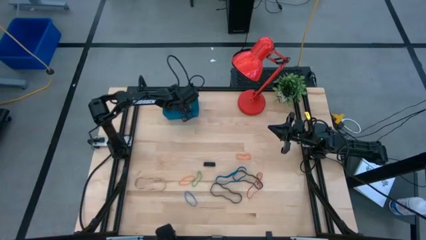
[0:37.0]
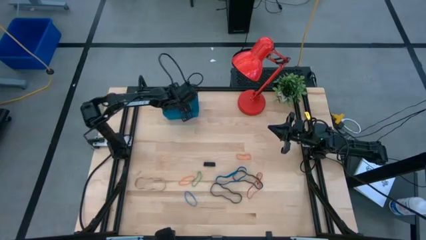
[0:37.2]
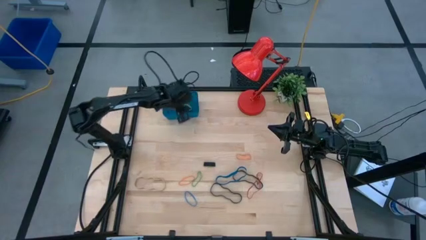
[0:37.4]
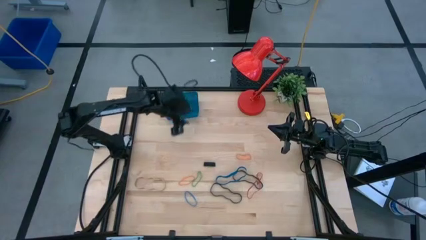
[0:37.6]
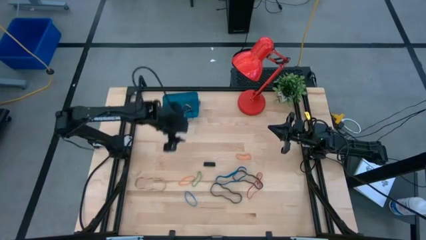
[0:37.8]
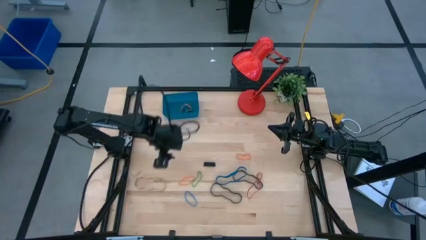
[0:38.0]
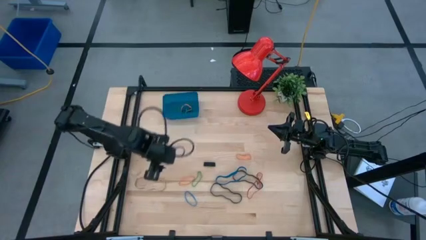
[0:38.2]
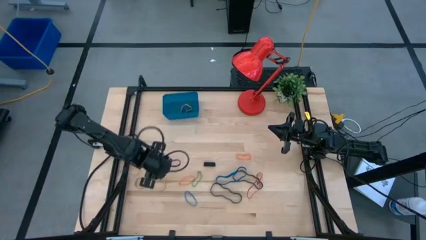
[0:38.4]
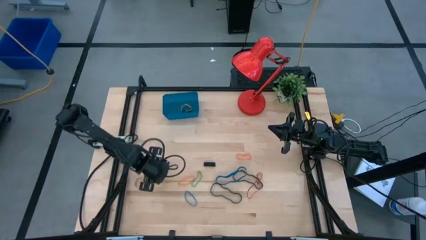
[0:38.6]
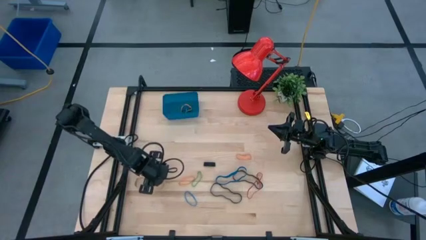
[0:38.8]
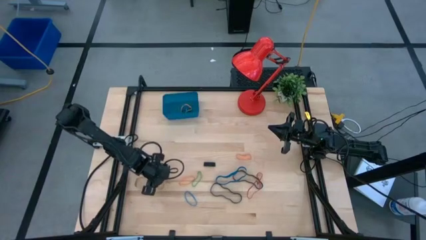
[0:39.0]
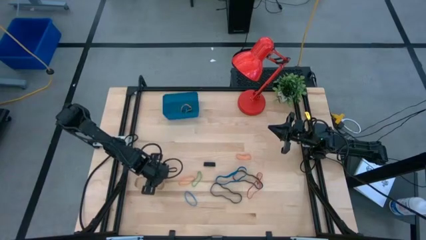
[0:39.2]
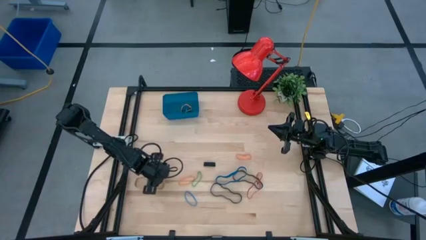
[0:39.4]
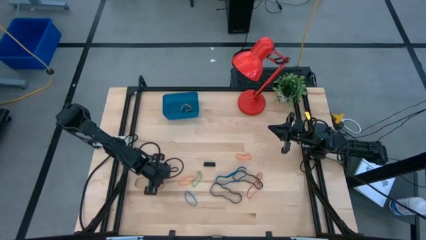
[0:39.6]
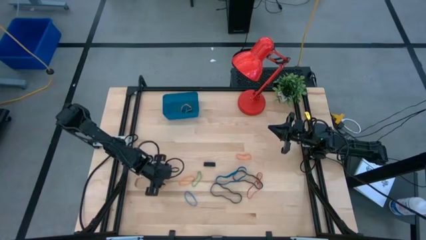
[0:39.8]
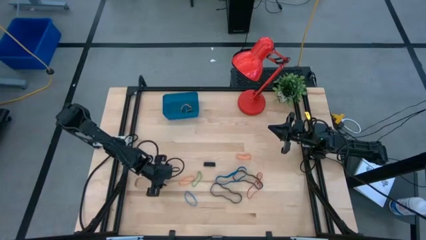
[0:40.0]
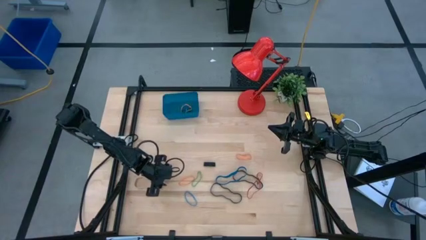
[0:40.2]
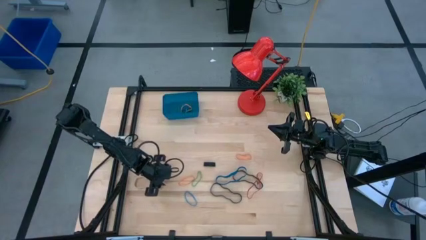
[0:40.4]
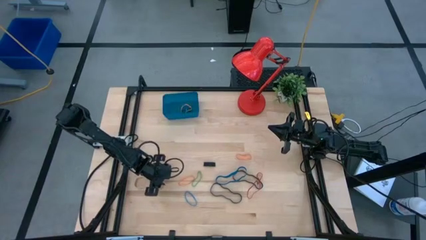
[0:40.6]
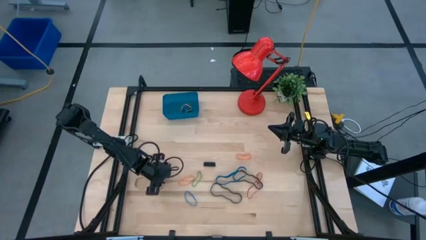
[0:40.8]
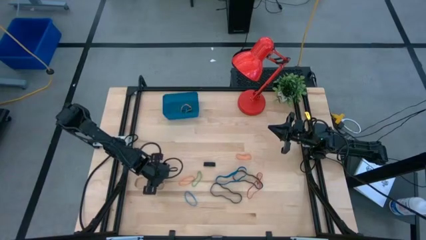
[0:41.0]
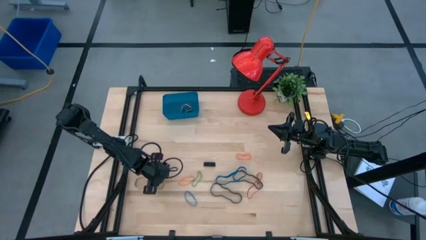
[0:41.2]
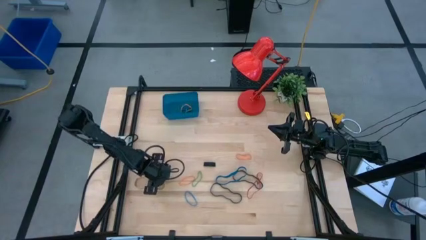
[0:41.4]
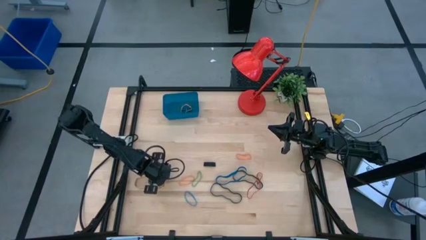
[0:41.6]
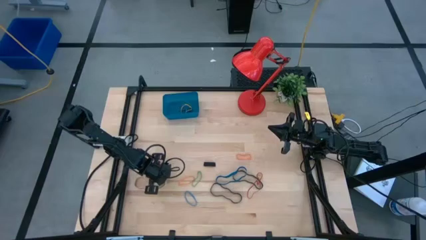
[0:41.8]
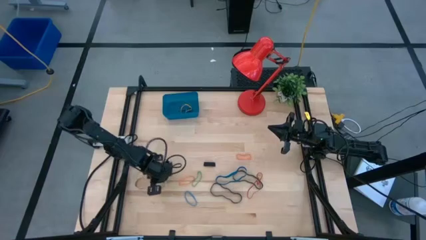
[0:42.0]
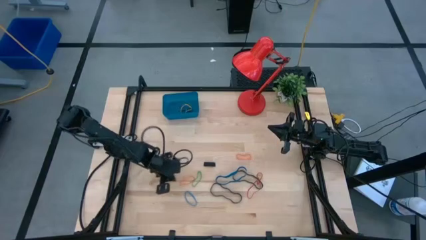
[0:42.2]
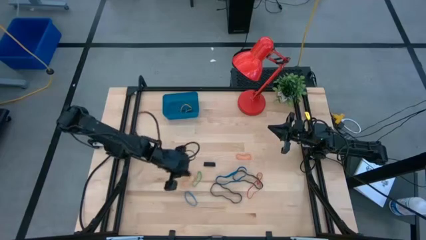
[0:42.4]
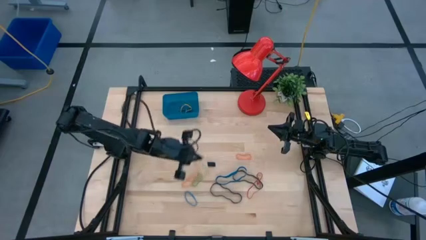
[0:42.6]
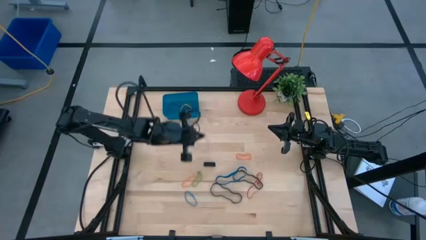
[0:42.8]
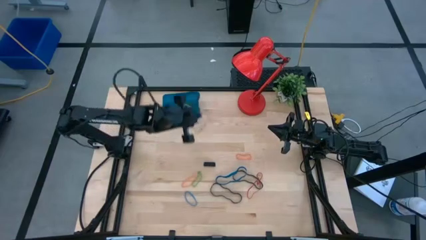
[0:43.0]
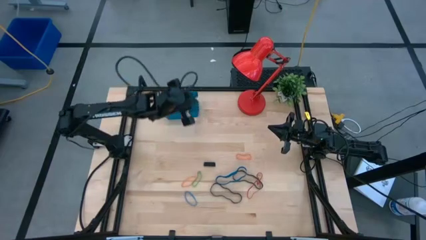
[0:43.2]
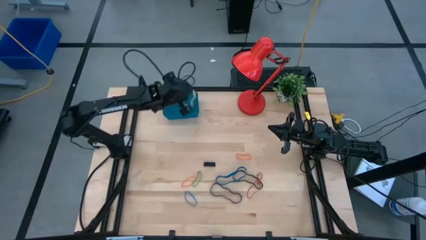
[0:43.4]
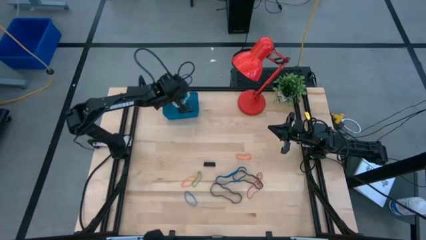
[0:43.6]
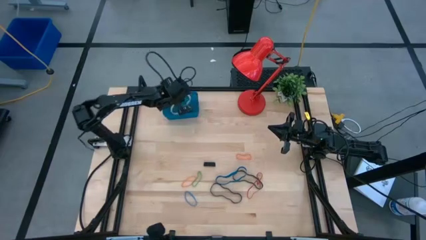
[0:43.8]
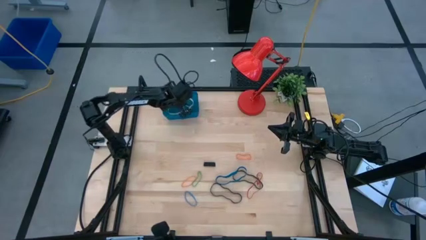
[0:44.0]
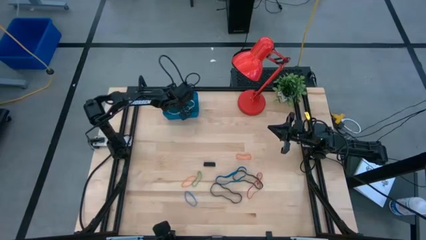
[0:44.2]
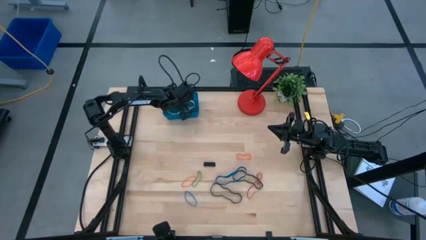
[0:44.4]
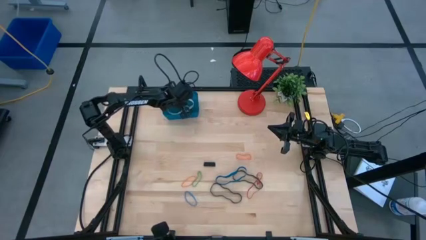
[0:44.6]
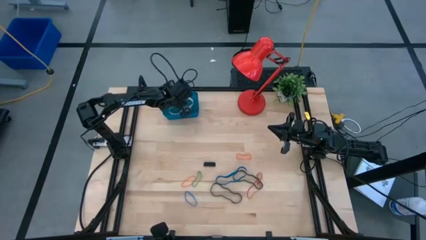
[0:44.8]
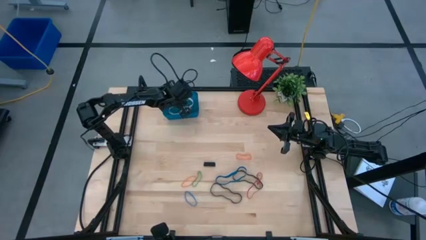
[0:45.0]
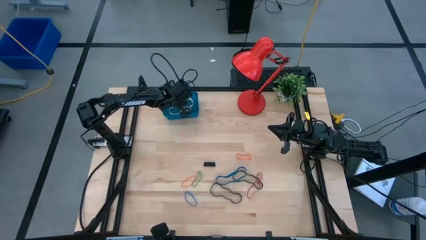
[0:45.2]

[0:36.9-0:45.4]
Task: Pick and place rubber bands into bin
Put the brown rubber band into the blue container

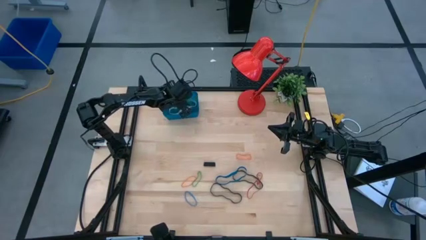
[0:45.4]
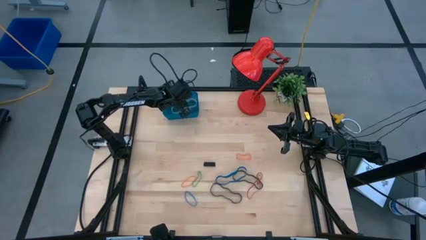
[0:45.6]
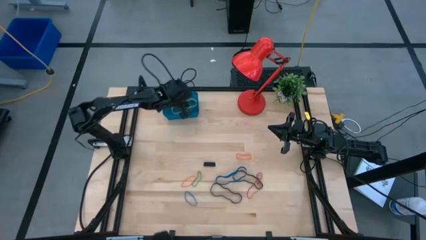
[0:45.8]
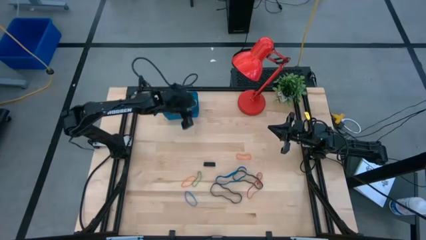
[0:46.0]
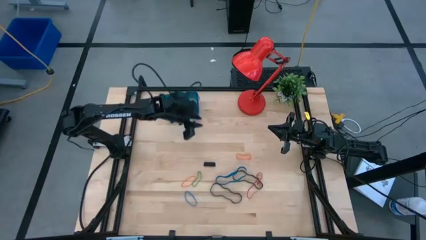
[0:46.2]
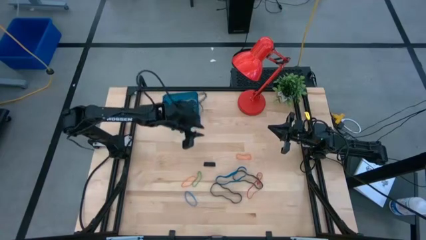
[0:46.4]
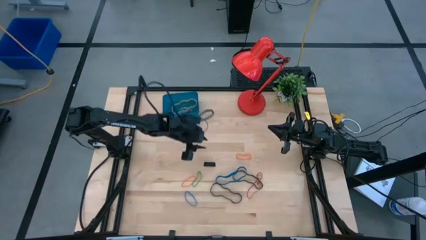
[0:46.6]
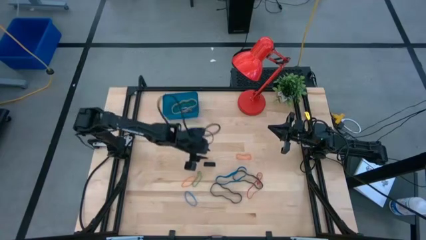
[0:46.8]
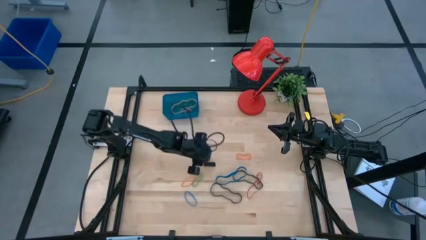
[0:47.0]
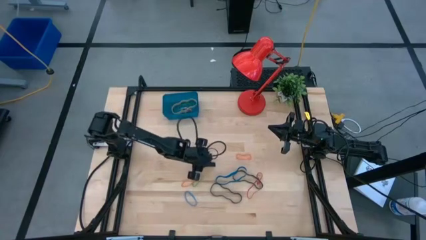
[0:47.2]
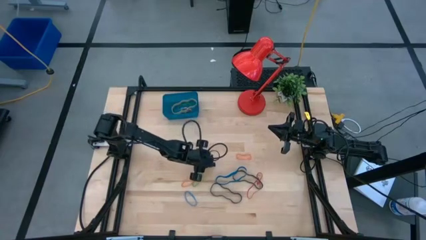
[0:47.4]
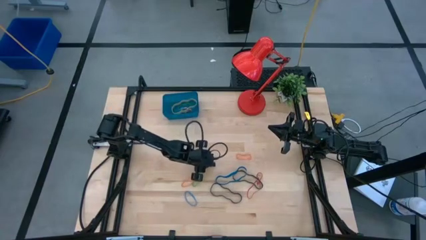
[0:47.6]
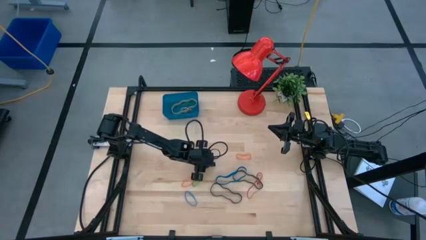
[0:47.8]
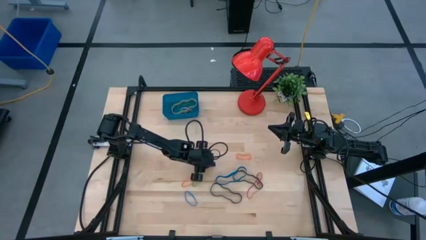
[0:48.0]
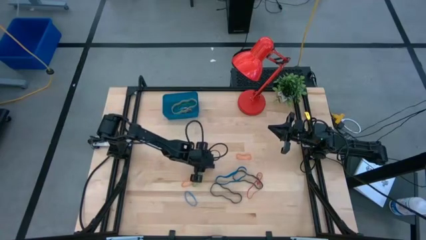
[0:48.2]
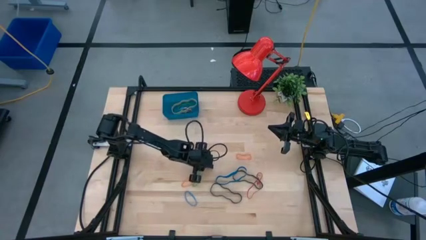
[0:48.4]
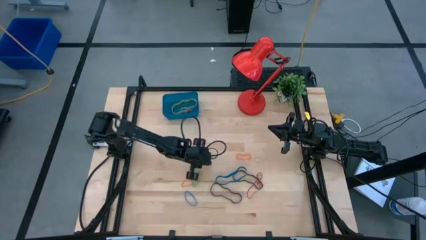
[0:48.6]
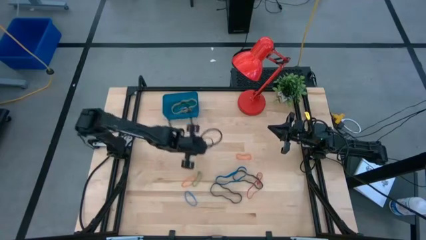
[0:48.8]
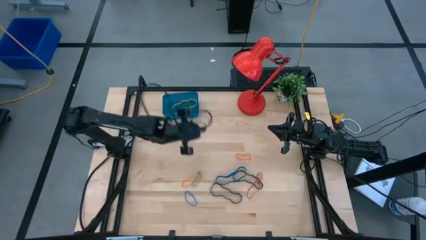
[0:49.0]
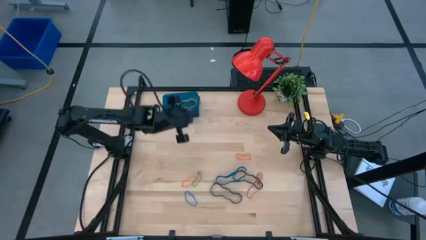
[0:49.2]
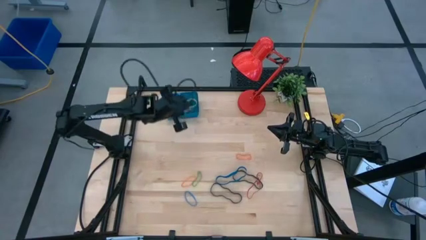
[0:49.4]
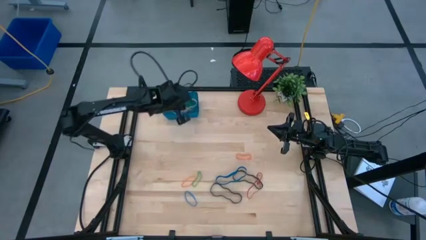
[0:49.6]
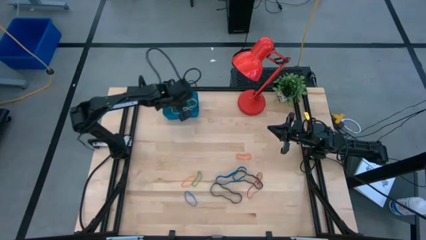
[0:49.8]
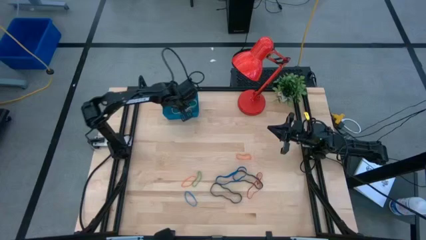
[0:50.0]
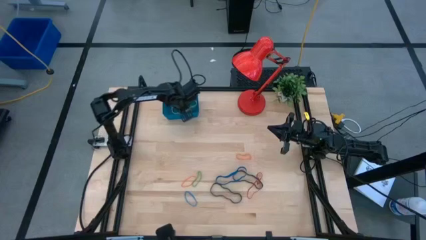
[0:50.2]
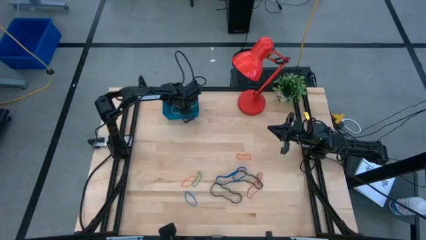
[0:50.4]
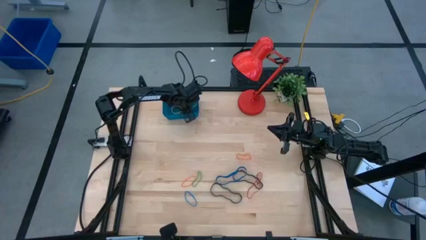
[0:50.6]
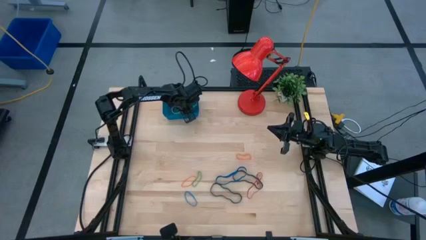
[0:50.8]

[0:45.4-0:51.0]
Put the top black rubber band into the blue container
